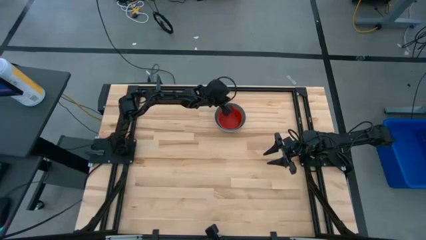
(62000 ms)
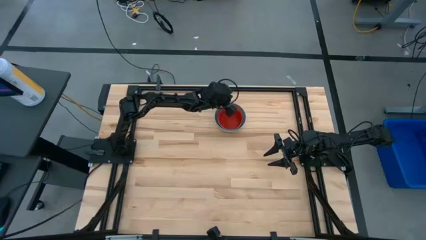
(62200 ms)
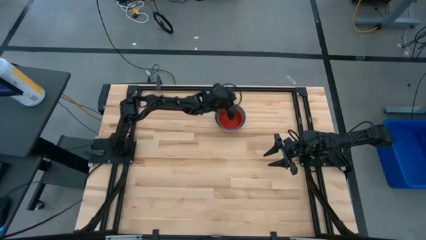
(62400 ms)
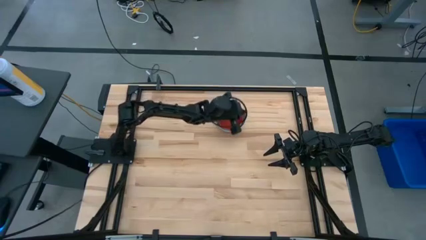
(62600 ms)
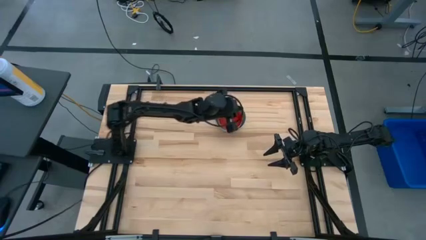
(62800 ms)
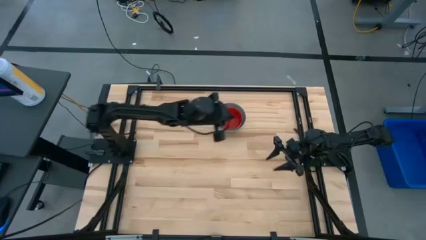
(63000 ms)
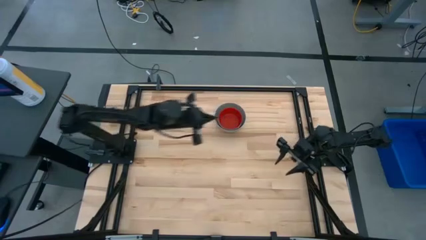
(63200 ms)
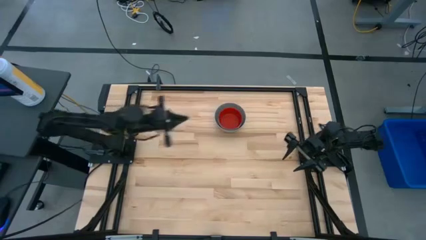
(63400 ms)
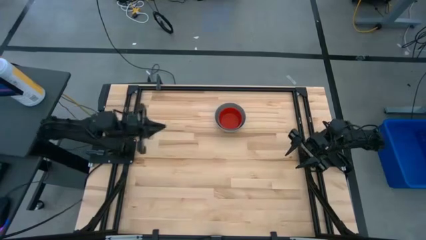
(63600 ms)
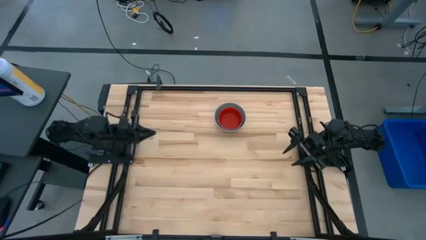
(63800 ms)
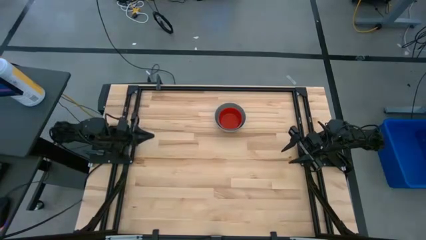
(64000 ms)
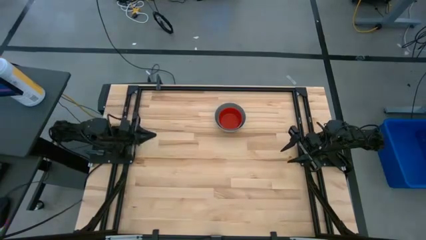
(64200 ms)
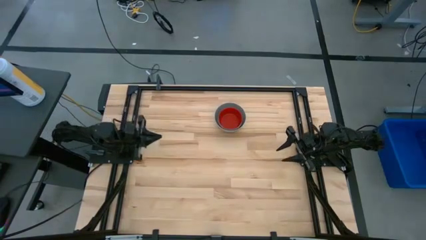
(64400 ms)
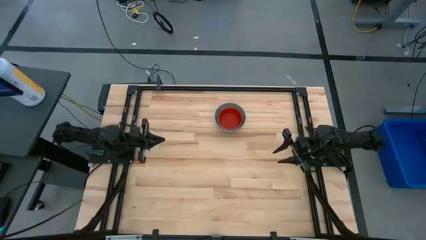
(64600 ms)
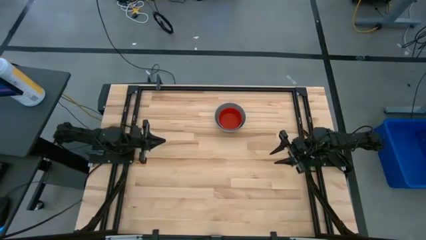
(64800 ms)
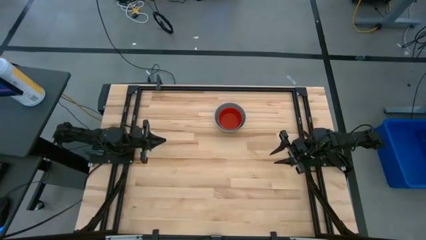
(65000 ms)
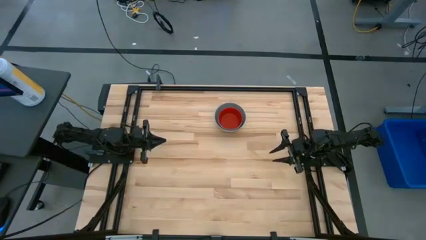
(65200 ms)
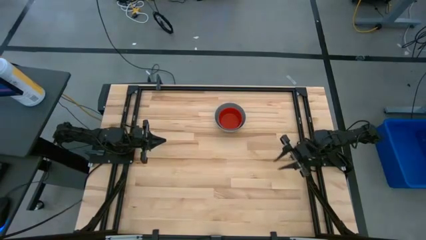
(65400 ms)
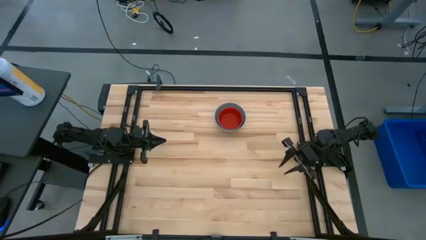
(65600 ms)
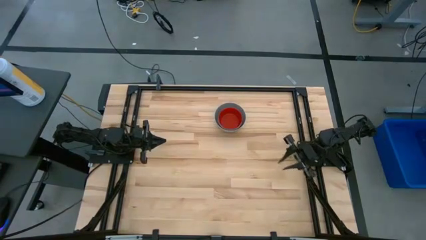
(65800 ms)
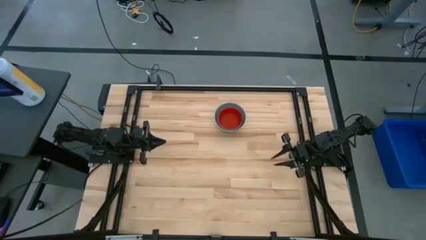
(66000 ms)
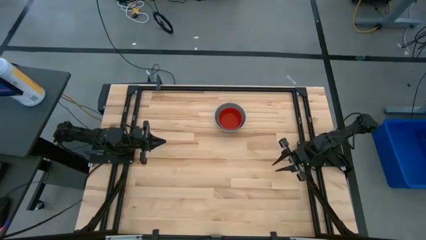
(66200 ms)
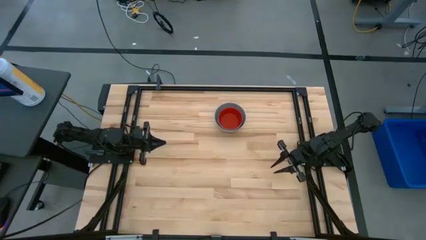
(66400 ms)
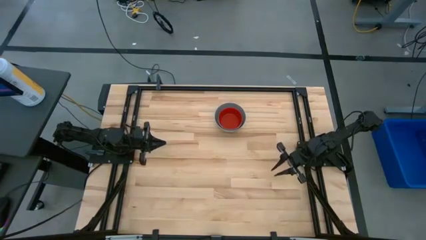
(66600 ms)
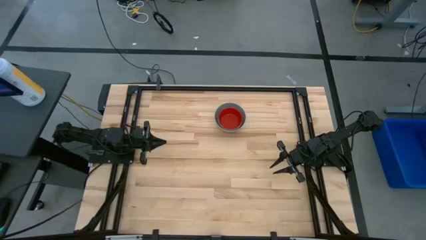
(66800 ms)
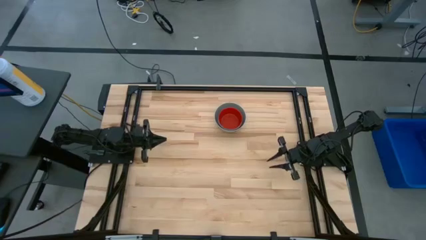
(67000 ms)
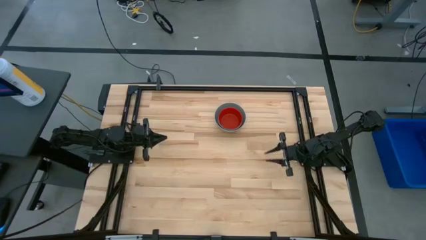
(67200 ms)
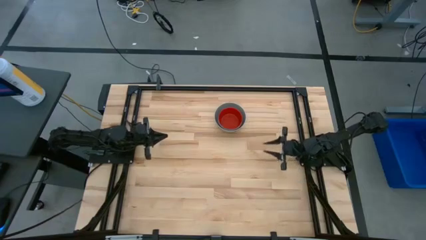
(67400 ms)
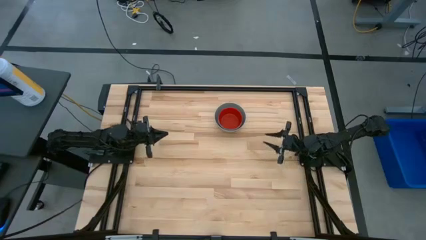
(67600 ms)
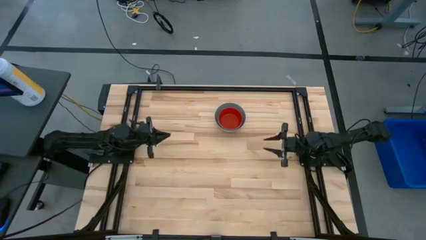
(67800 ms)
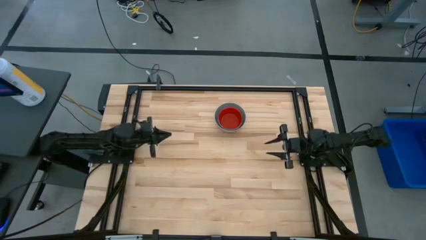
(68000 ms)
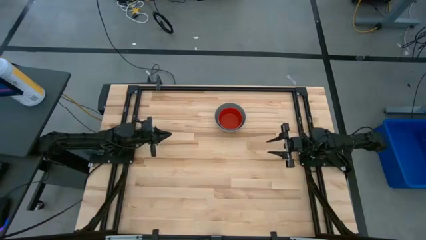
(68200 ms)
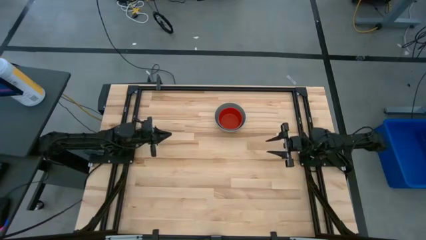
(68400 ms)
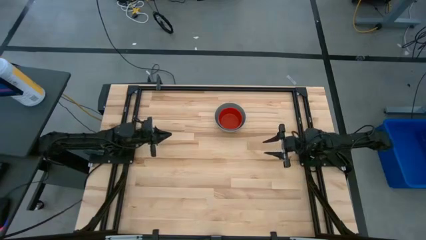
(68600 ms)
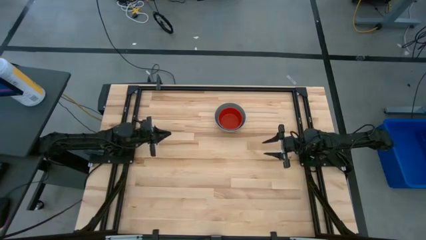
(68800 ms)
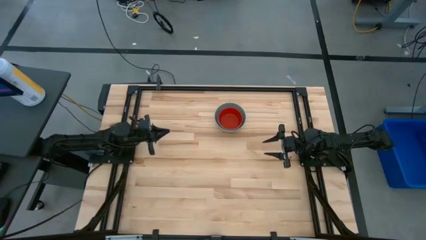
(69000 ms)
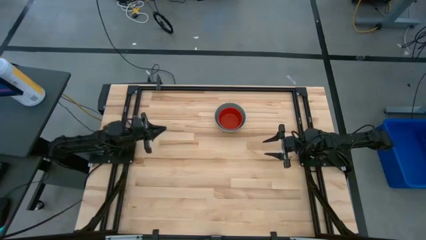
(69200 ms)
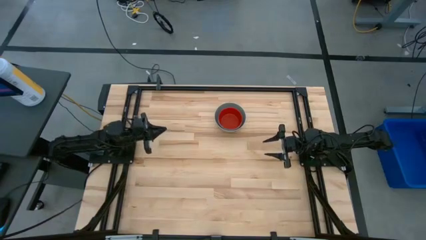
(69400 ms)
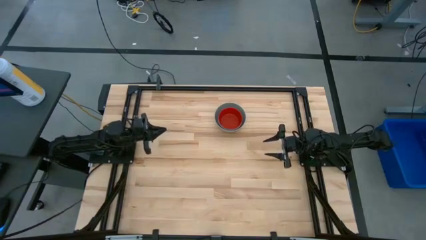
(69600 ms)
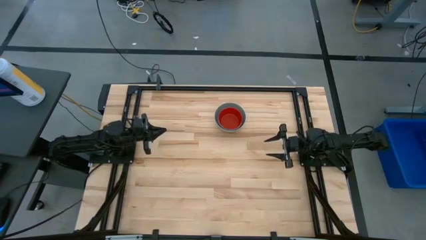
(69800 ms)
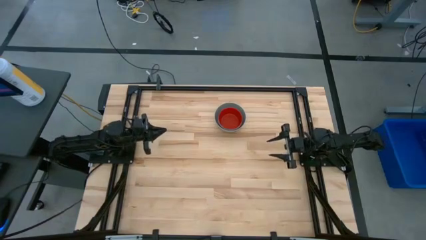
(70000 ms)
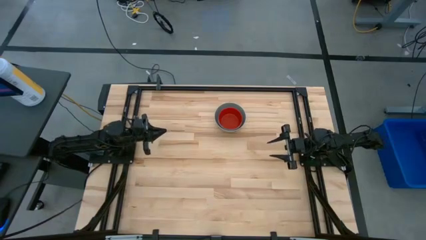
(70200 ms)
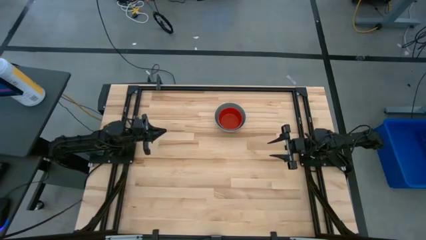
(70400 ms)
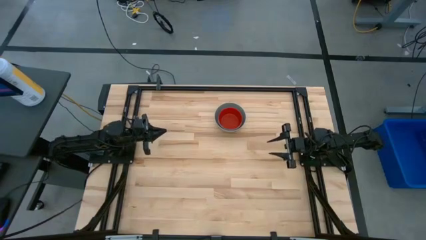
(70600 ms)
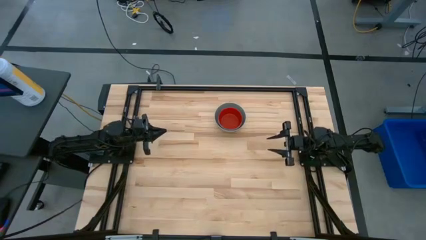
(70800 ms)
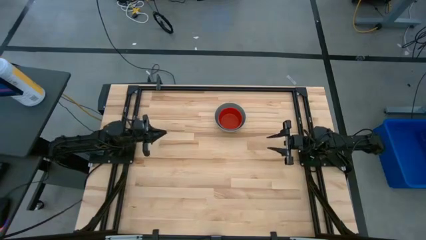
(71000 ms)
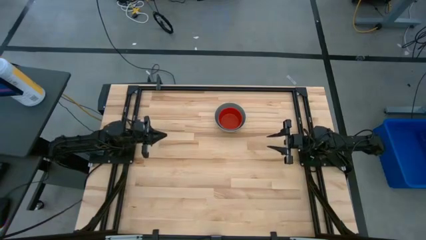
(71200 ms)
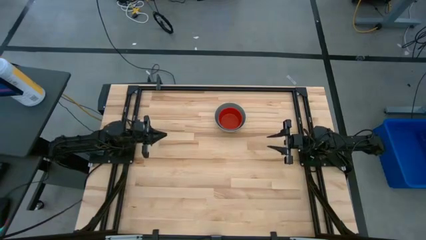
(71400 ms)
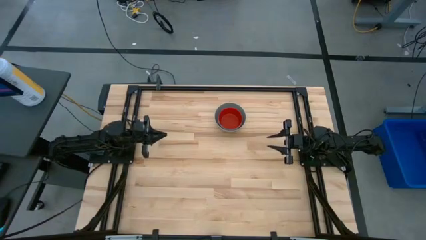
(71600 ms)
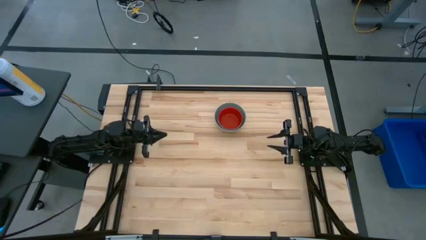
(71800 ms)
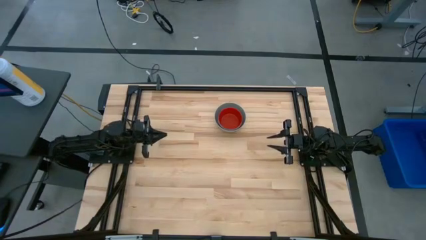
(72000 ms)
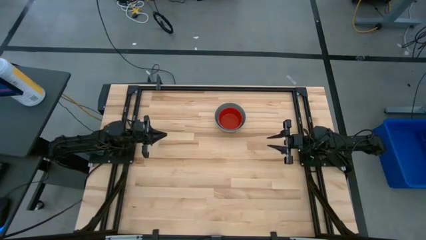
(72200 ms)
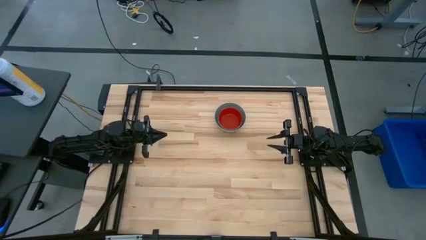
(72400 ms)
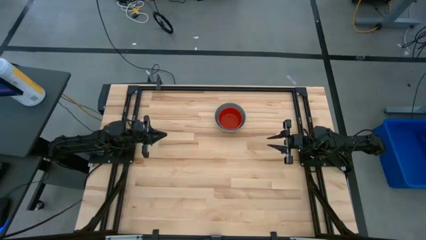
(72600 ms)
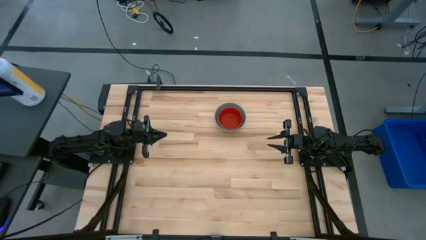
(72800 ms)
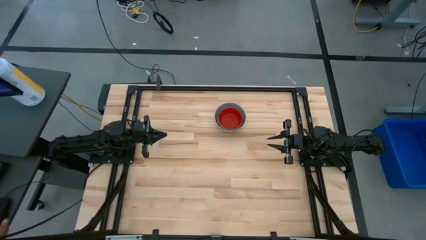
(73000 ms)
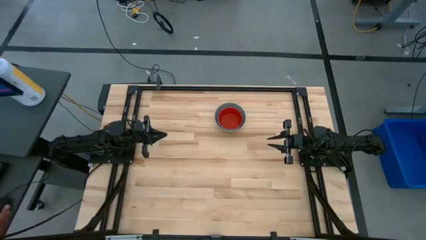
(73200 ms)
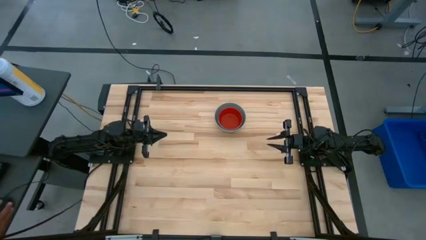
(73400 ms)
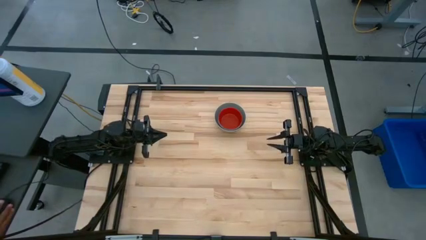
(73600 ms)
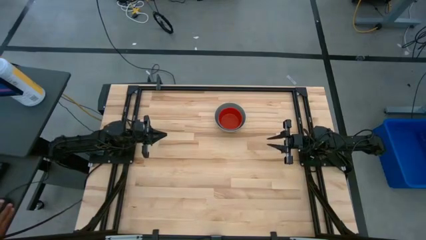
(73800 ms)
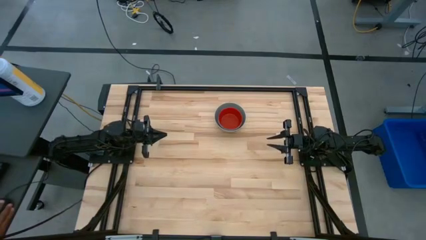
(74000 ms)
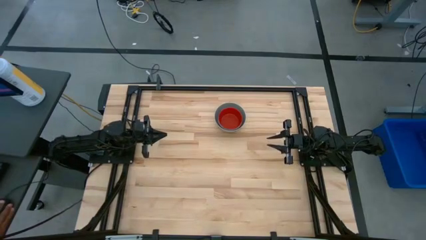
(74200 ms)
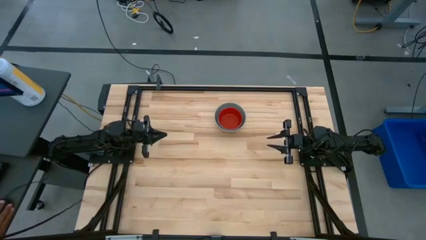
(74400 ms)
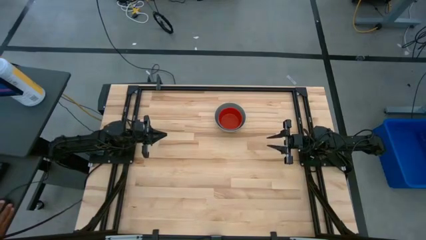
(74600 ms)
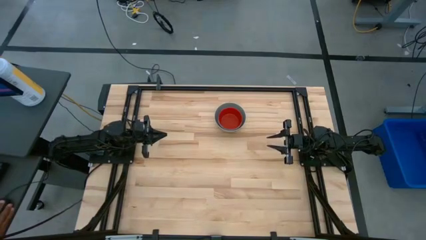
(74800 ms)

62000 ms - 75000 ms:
Return to Home Position

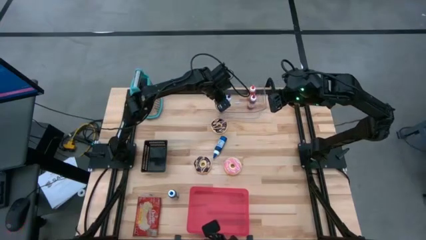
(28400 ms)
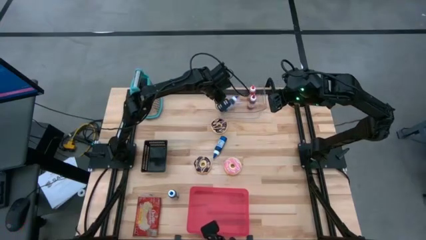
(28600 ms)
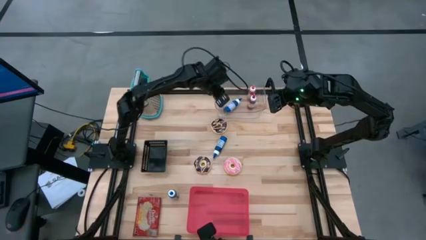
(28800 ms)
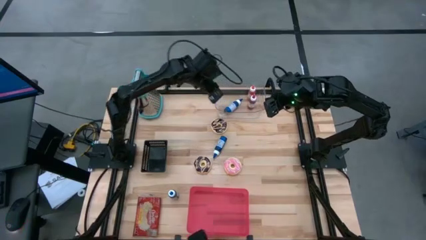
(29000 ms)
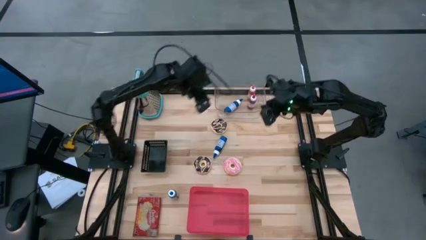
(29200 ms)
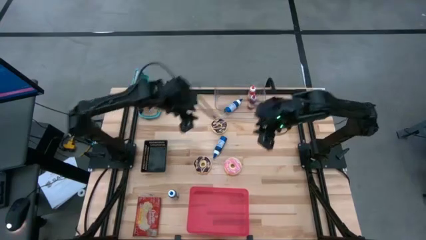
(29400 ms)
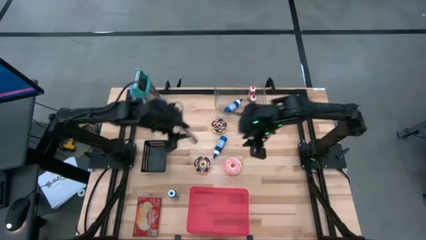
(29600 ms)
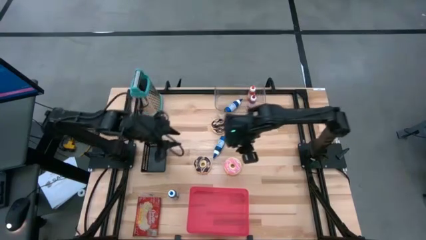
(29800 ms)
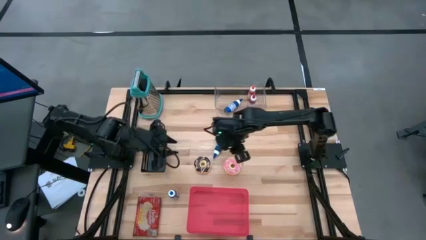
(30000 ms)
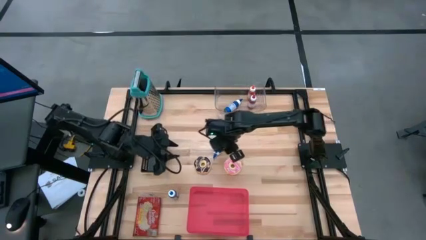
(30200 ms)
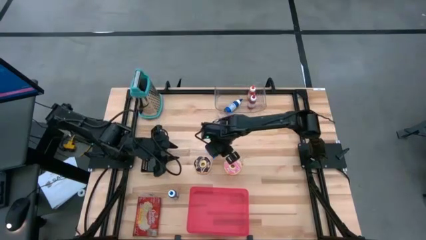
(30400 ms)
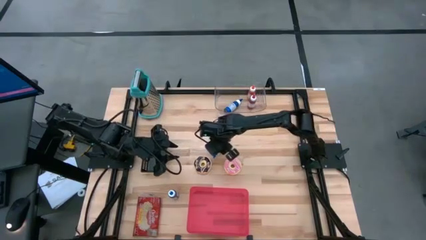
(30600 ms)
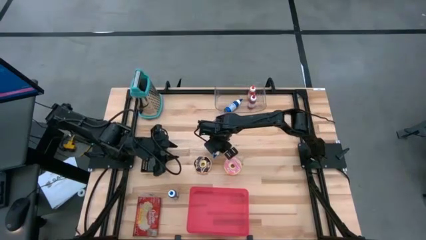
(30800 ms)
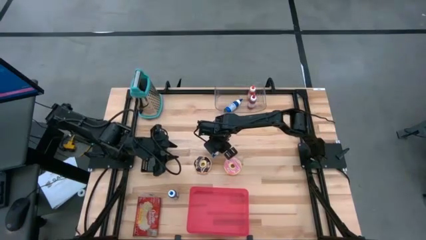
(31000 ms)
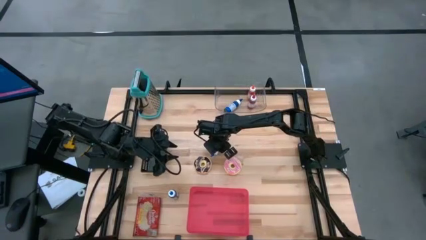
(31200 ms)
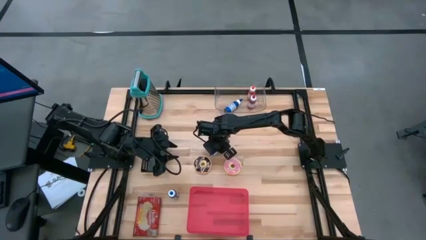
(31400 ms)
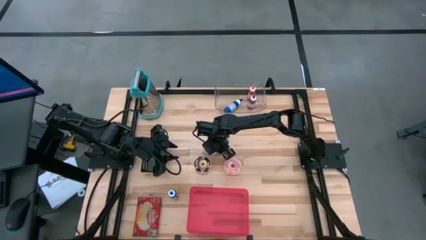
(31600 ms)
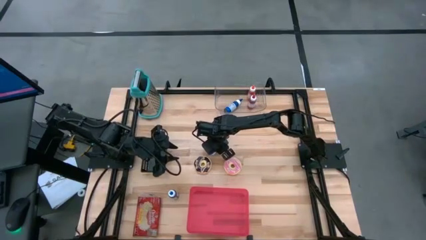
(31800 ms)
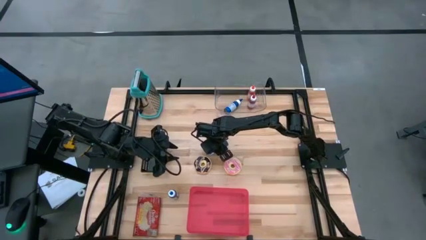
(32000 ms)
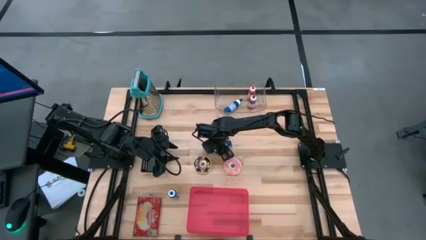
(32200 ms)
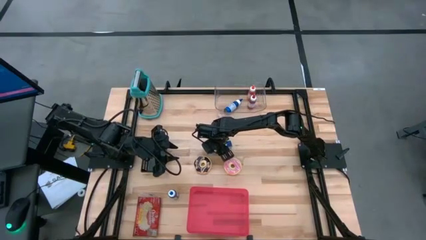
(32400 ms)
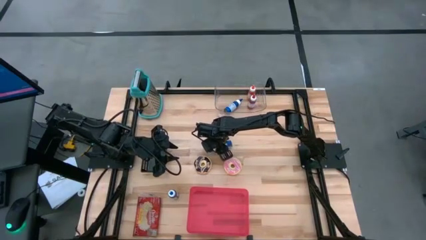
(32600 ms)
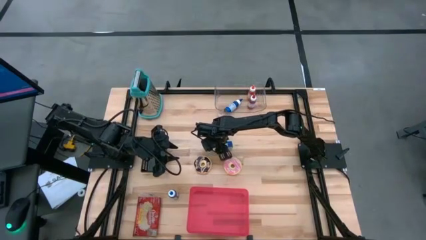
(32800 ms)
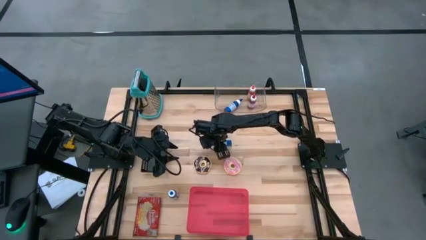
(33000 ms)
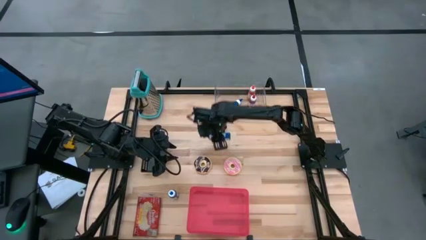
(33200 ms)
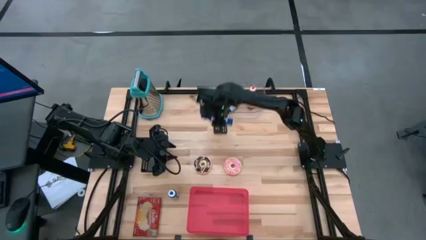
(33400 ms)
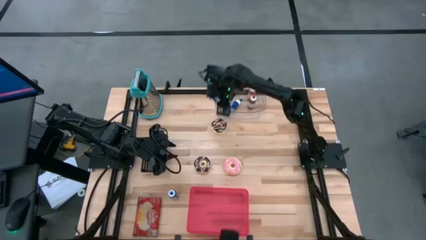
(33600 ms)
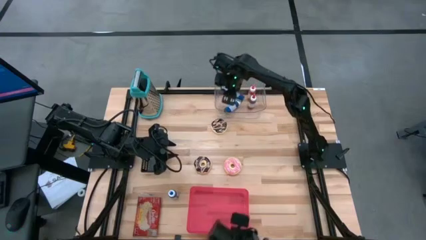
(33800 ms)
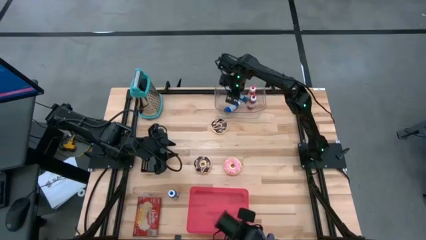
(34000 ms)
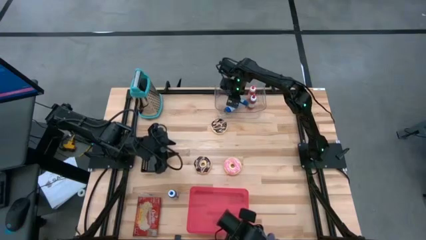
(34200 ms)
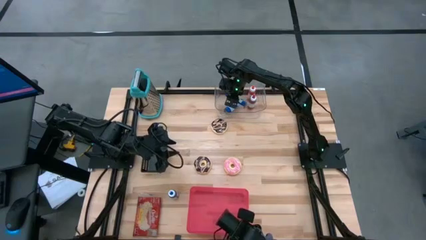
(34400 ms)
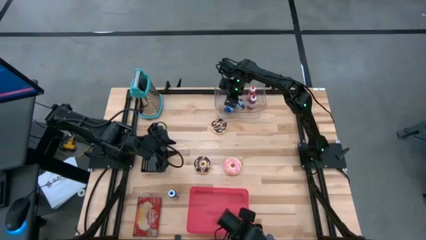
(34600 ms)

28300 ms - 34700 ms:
Put the top blue food coloring bottle into the transparent bin
